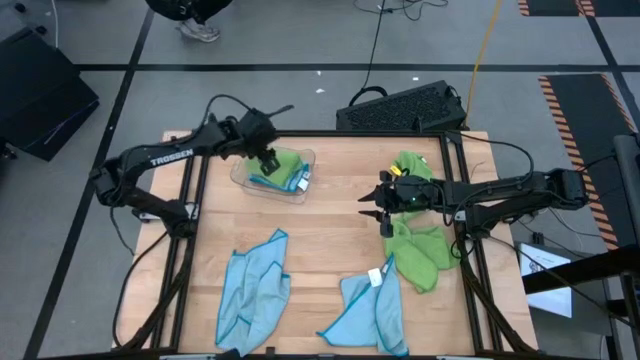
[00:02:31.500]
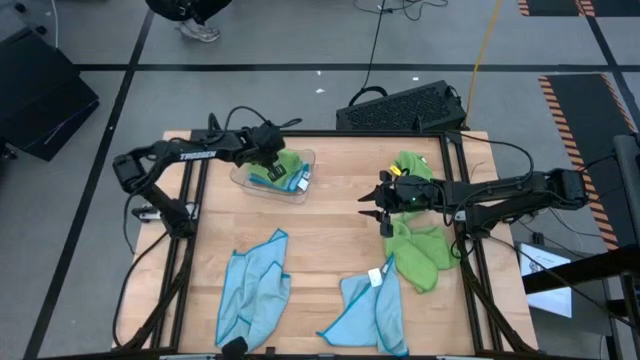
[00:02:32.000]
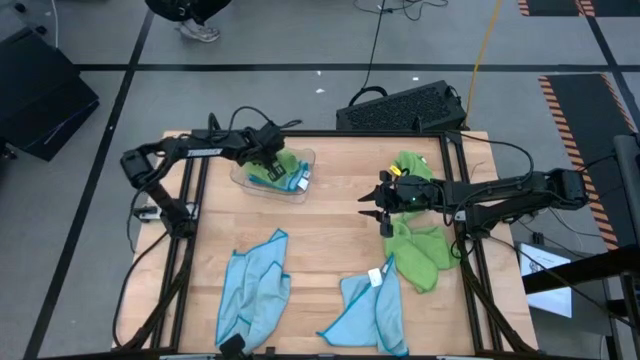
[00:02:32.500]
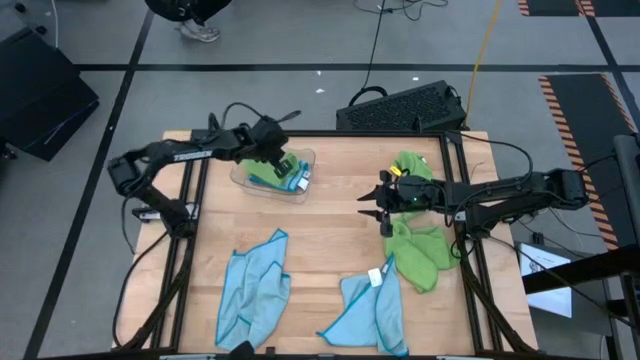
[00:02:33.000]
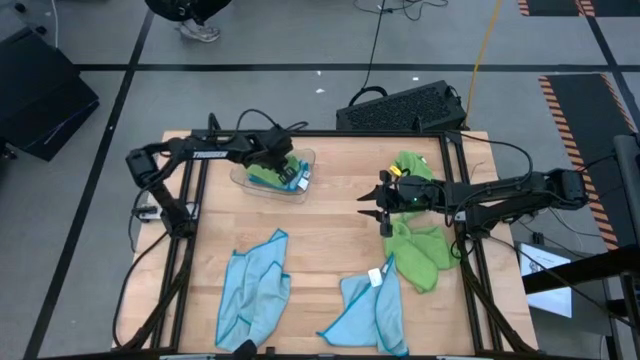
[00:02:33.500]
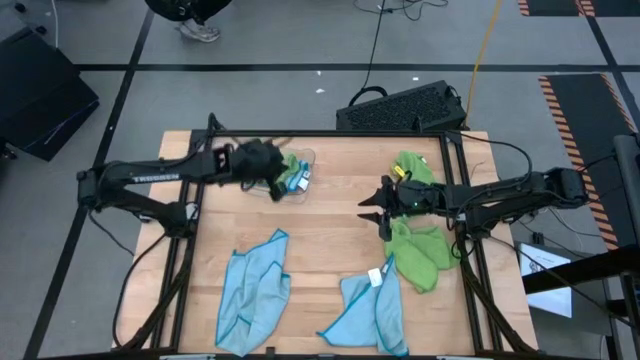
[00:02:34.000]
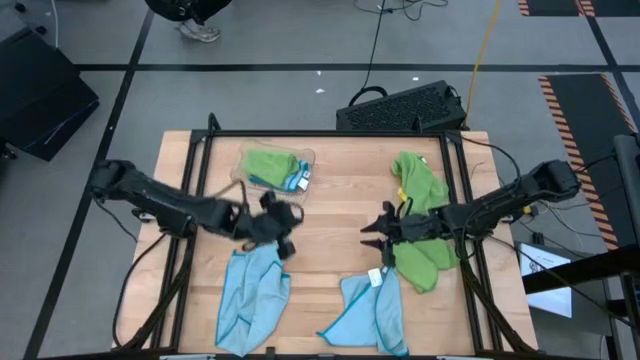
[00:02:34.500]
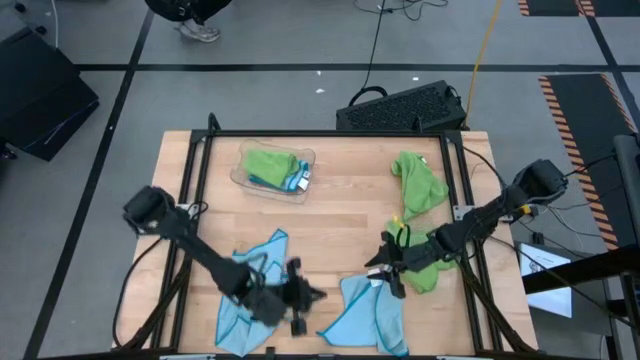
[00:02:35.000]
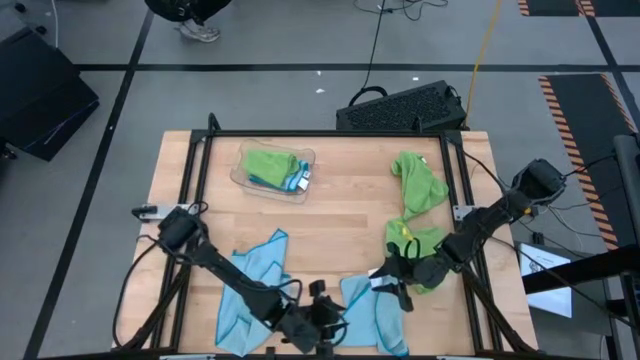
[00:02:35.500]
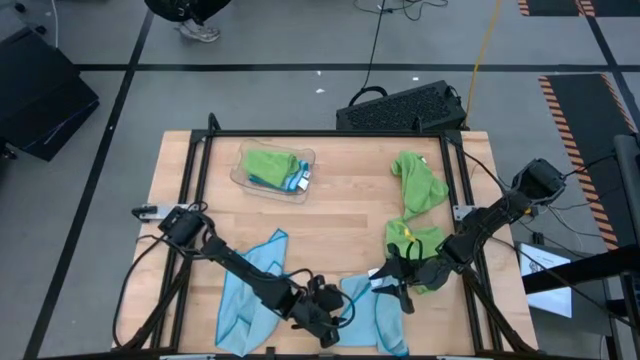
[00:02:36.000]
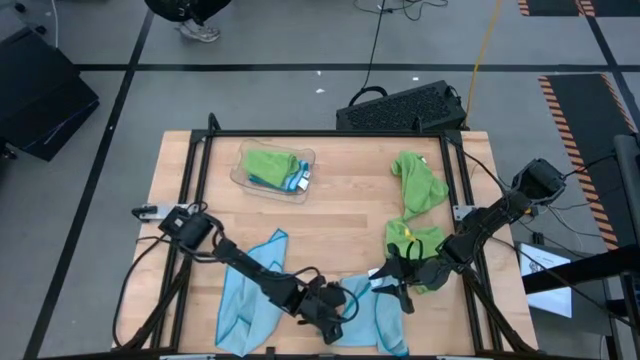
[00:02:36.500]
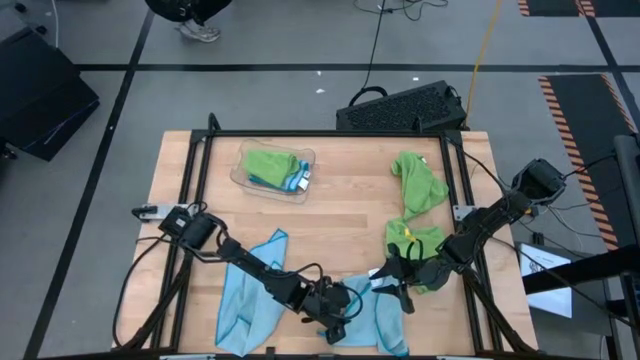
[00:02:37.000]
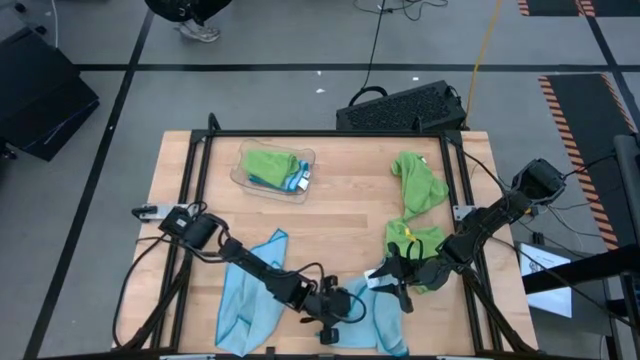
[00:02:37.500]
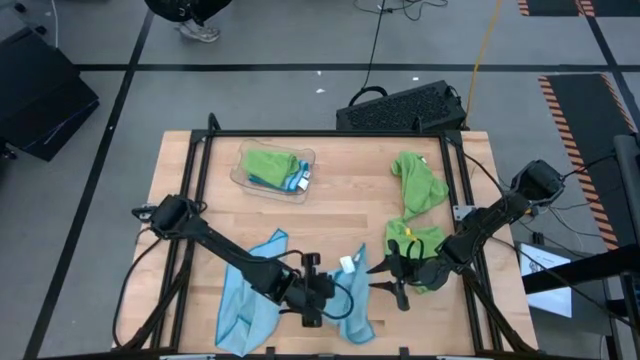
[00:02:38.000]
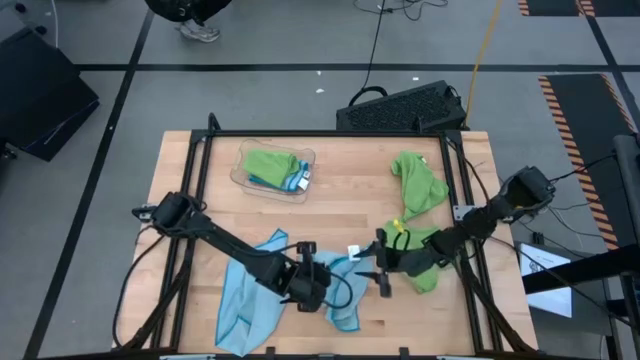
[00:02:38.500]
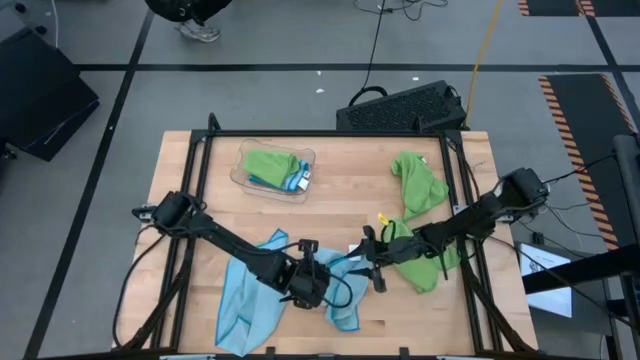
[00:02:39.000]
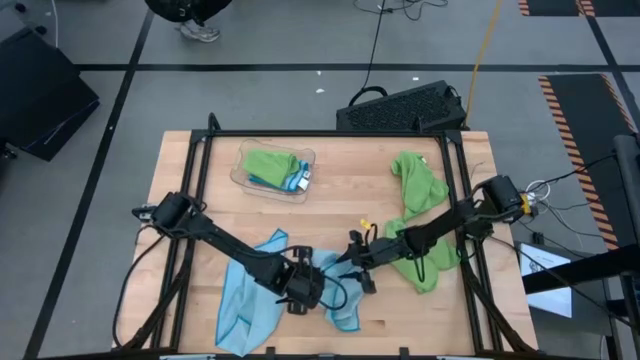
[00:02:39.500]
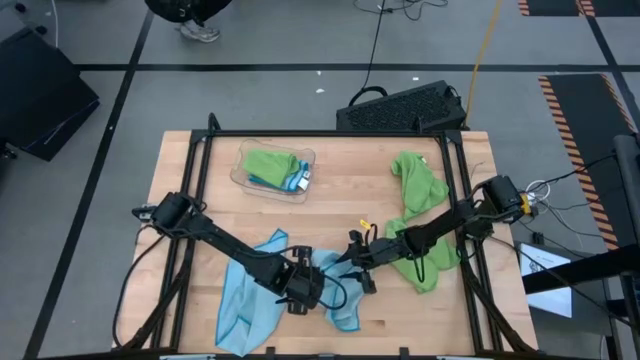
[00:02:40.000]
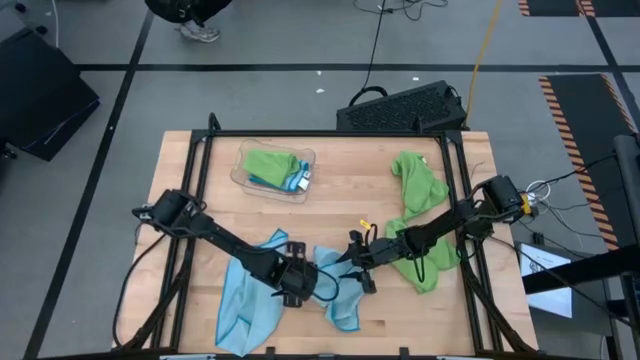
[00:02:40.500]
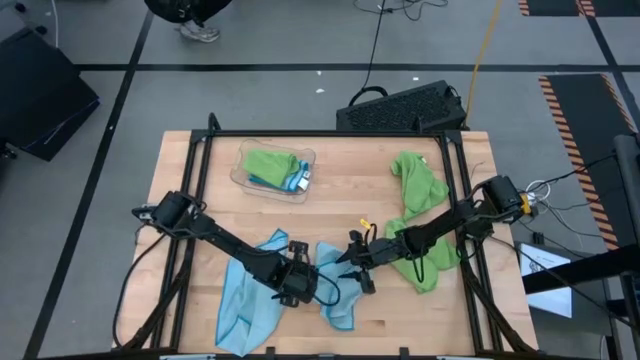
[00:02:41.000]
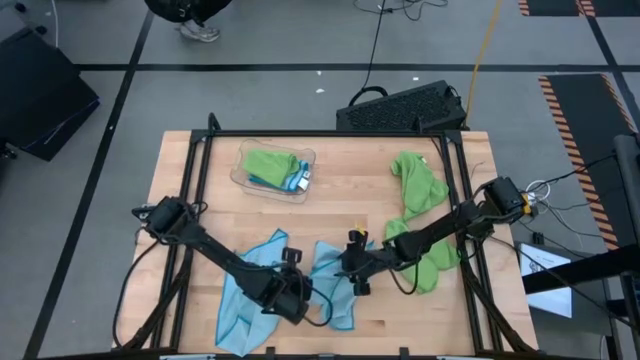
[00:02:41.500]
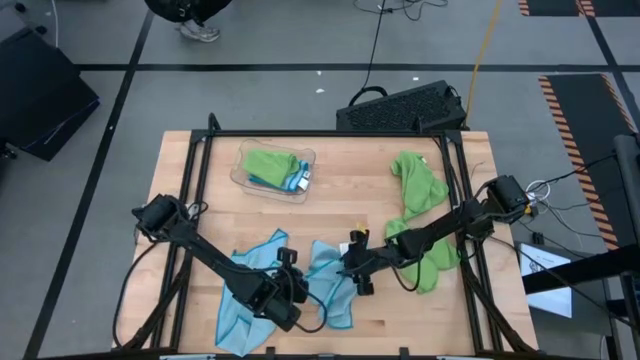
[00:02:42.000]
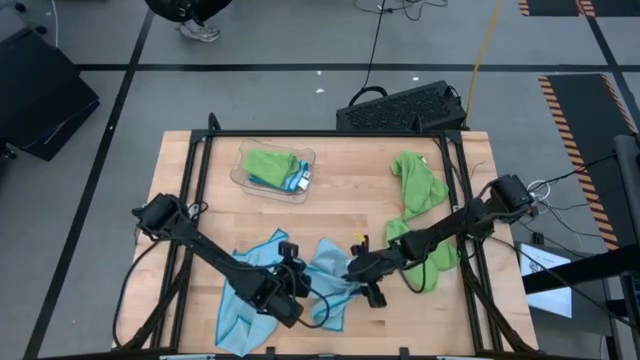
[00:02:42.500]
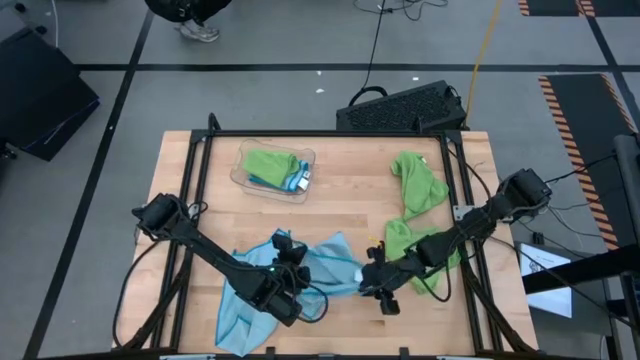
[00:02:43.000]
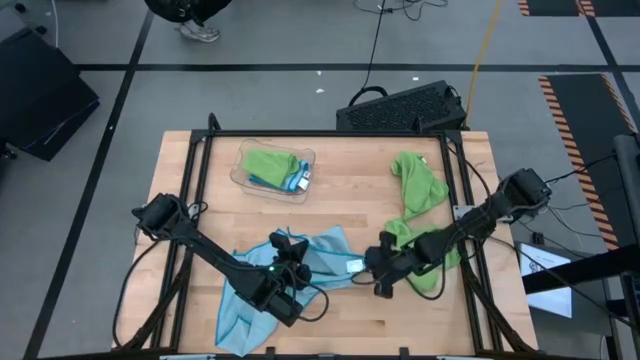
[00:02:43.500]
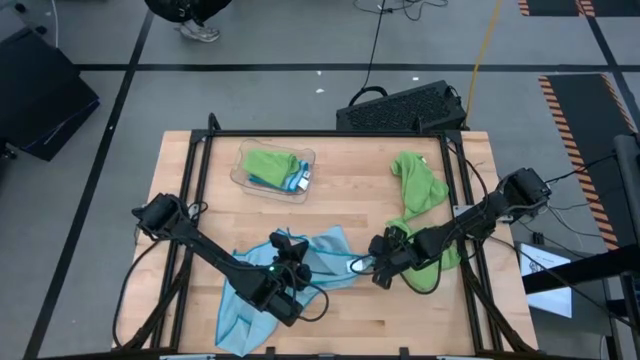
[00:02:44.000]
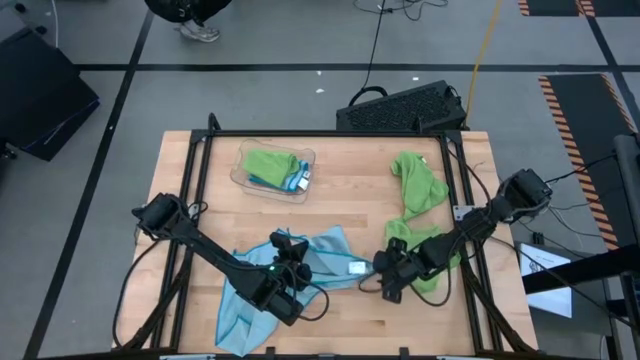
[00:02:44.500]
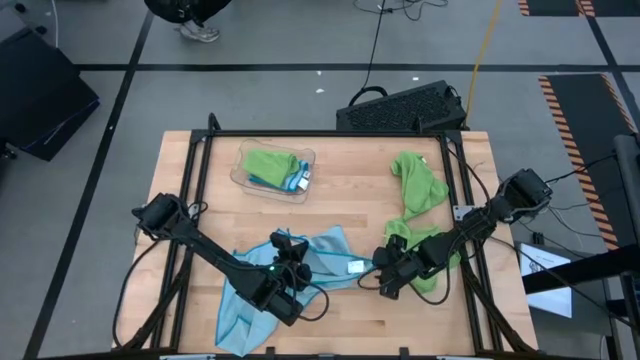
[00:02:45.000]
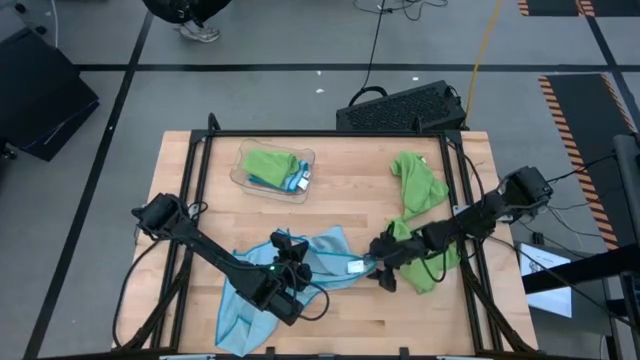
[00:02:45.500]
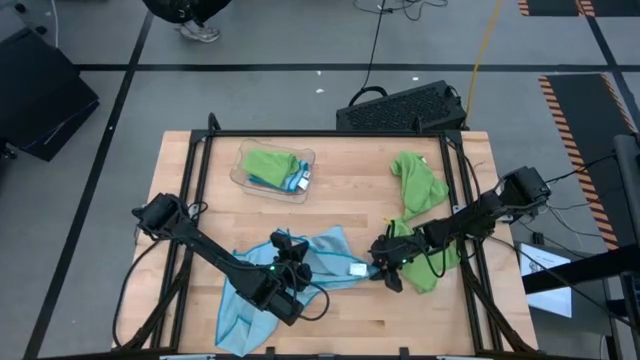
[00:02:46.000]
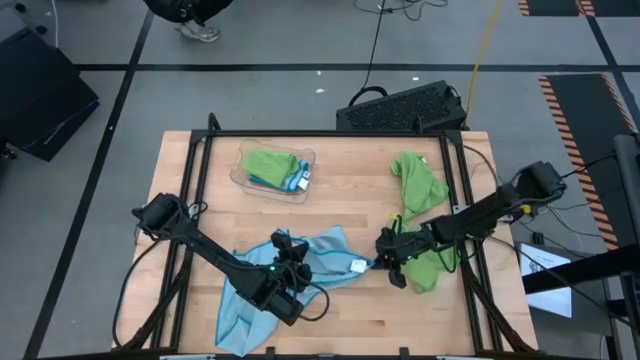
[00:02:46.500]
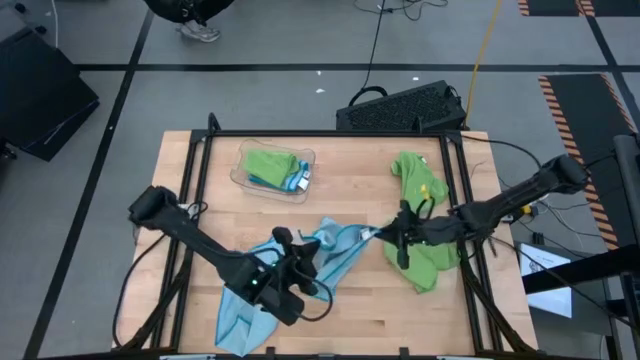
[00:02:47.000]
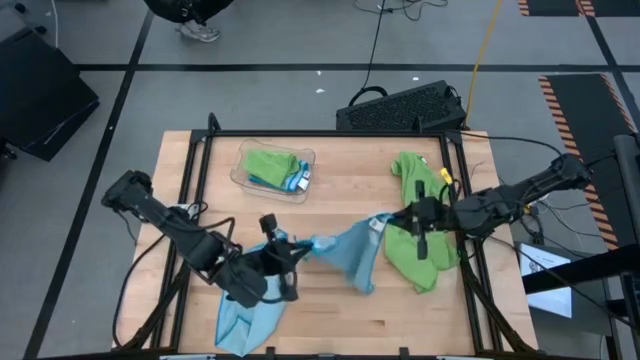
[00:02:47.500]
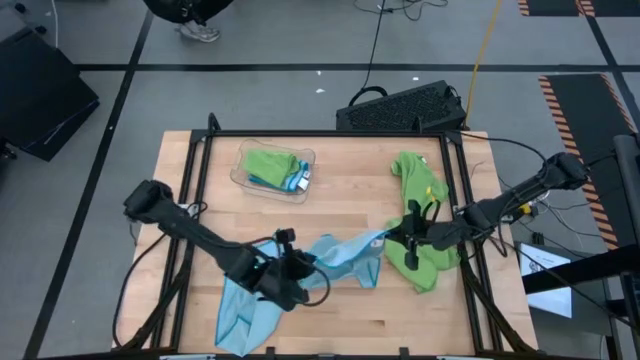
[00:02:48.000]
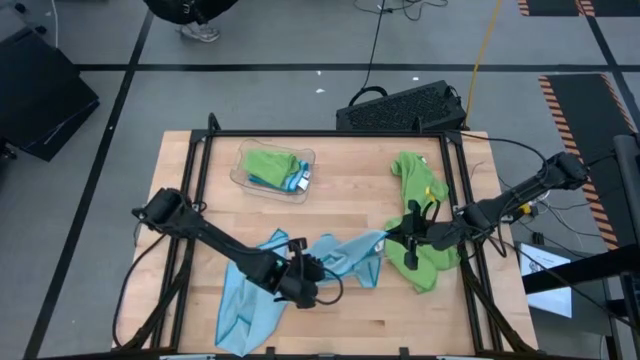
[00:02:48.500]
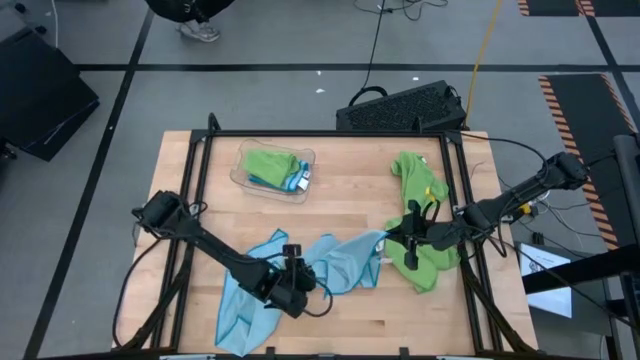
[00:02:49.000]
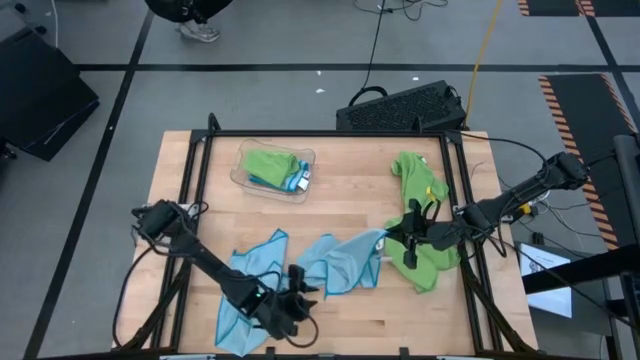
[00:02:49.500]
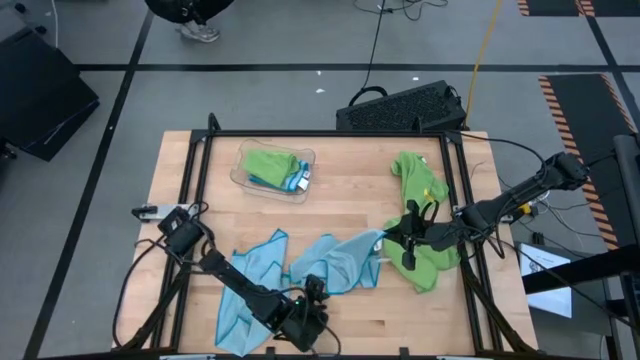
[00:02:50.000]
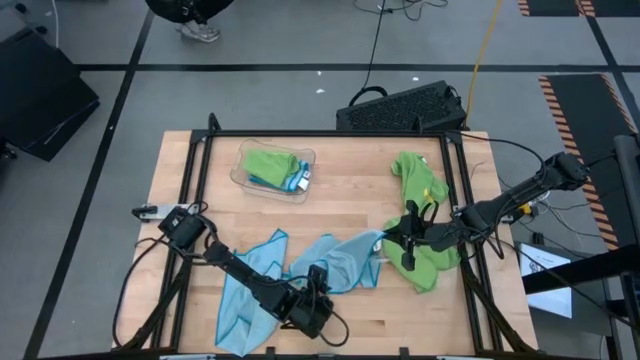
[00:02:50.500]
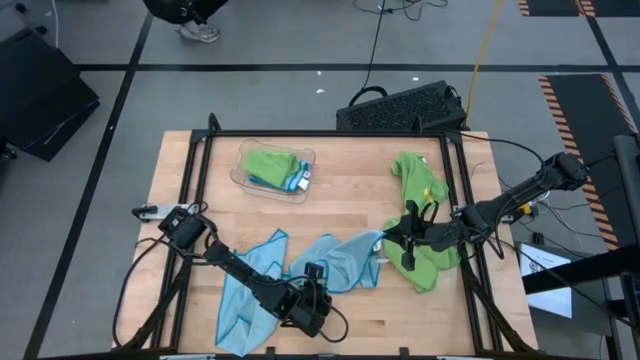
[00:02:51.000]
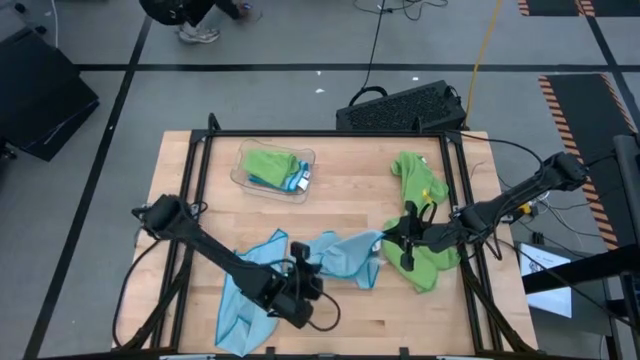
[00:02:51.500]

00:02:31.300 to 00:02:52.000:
Task: Fold microfiber towels
Fold the right blue microfiber cloth
